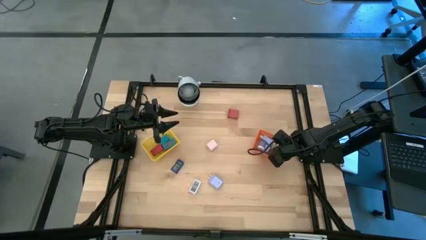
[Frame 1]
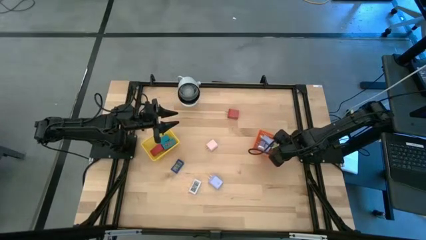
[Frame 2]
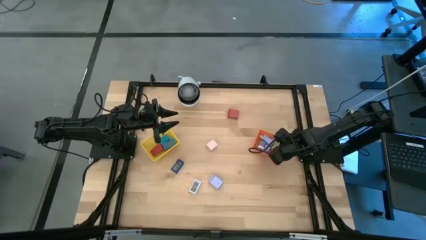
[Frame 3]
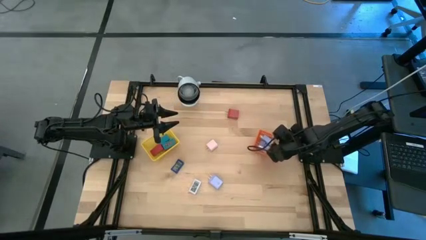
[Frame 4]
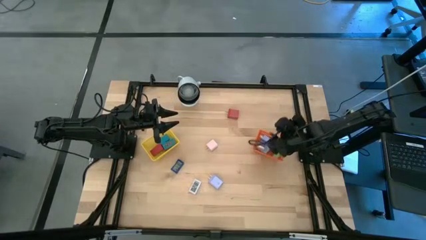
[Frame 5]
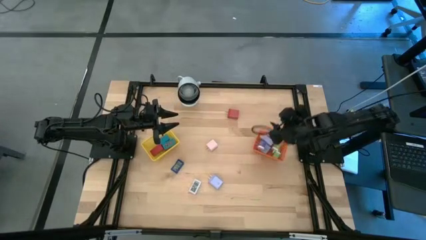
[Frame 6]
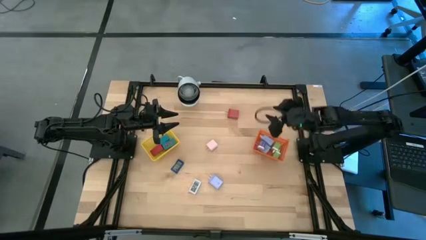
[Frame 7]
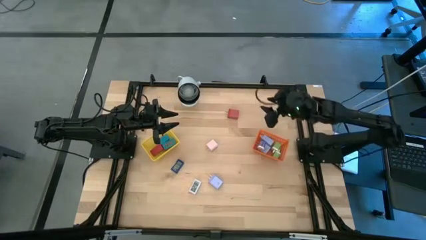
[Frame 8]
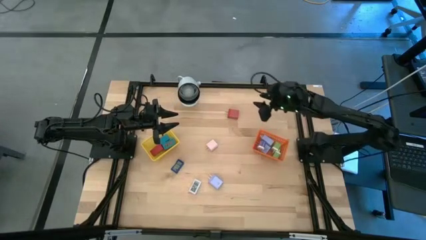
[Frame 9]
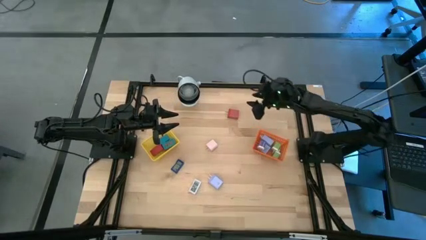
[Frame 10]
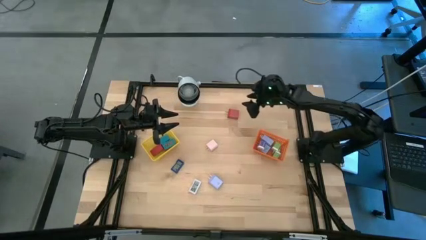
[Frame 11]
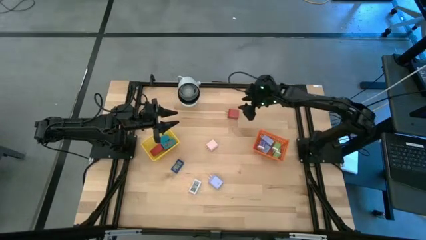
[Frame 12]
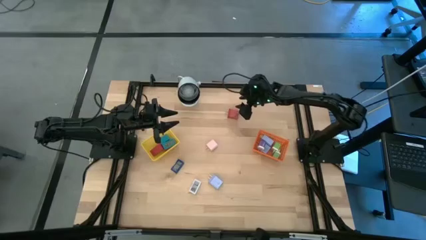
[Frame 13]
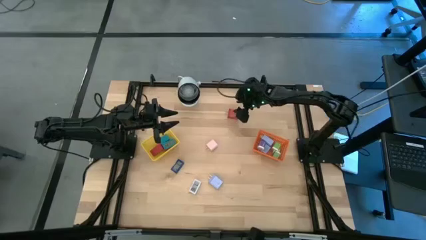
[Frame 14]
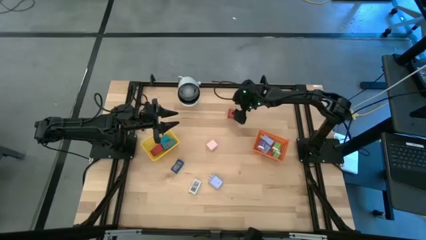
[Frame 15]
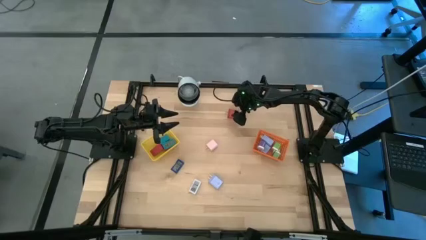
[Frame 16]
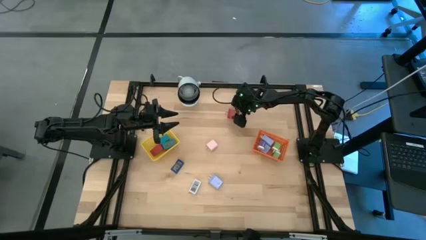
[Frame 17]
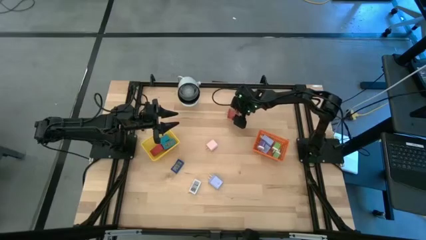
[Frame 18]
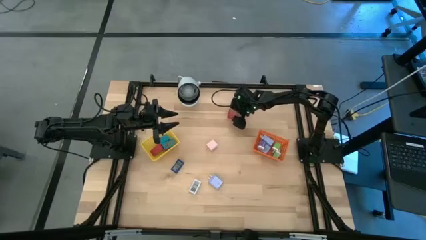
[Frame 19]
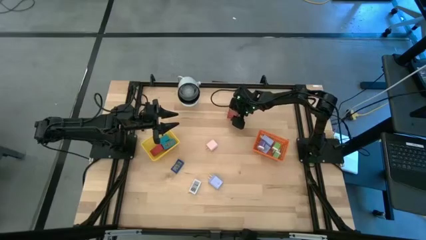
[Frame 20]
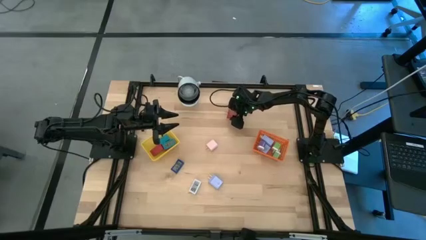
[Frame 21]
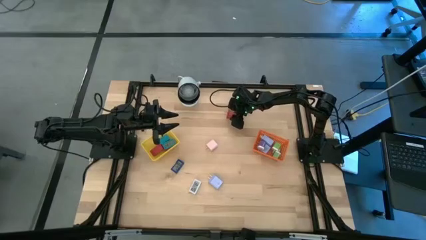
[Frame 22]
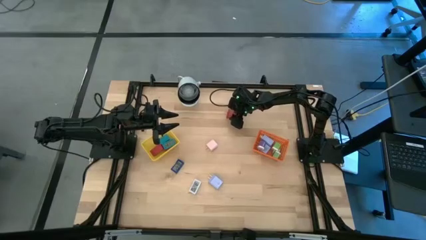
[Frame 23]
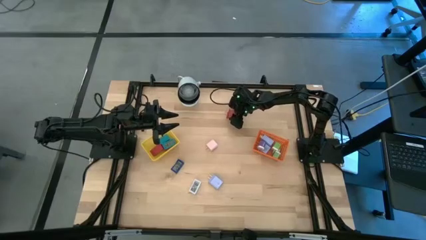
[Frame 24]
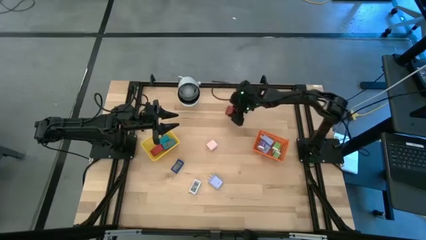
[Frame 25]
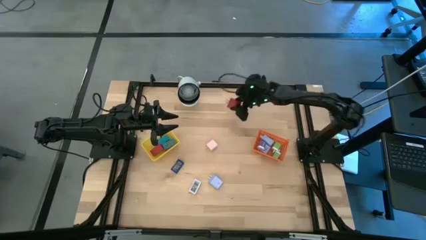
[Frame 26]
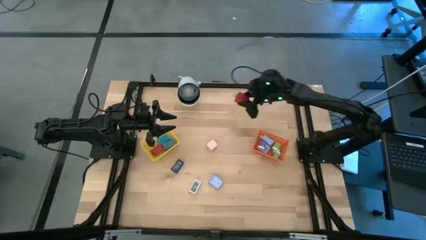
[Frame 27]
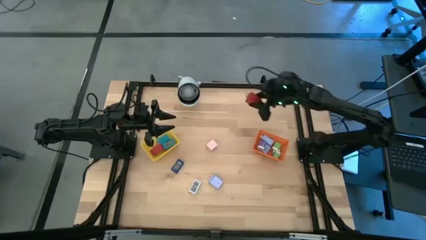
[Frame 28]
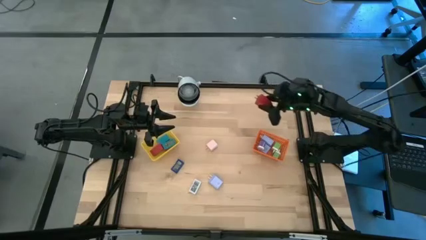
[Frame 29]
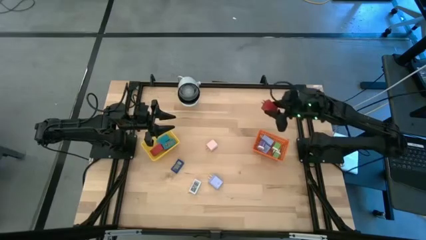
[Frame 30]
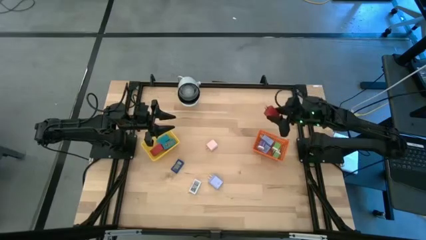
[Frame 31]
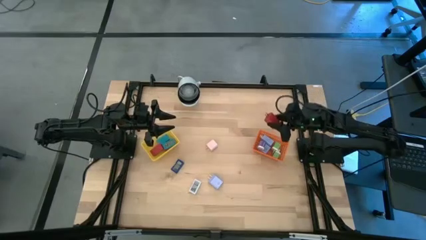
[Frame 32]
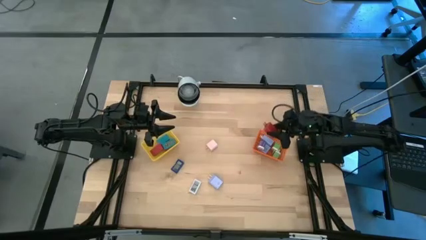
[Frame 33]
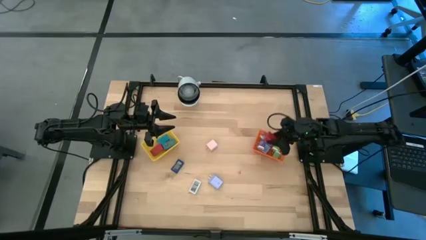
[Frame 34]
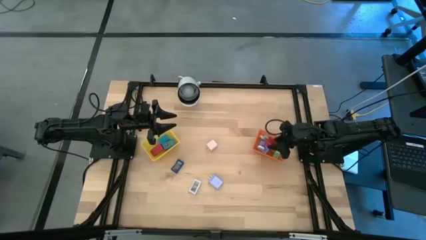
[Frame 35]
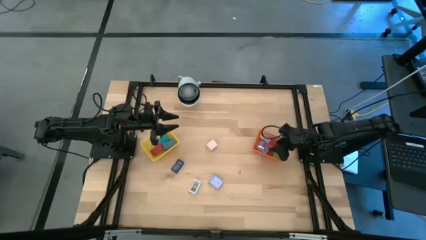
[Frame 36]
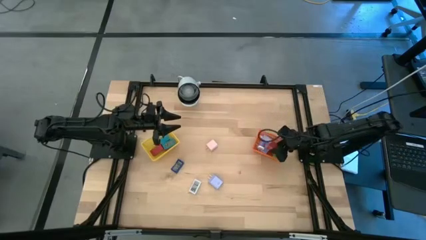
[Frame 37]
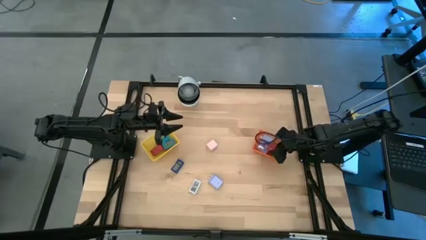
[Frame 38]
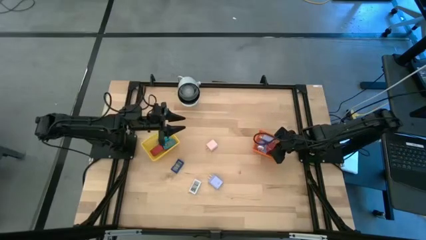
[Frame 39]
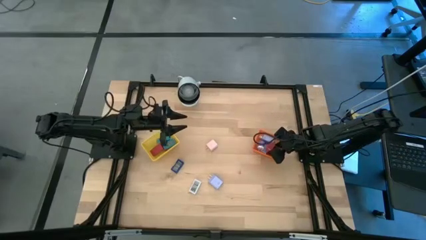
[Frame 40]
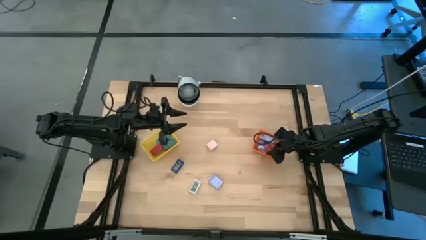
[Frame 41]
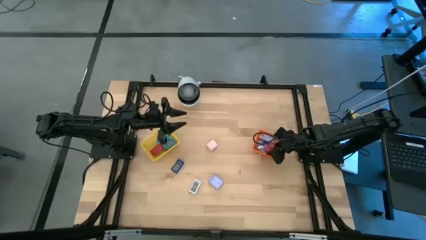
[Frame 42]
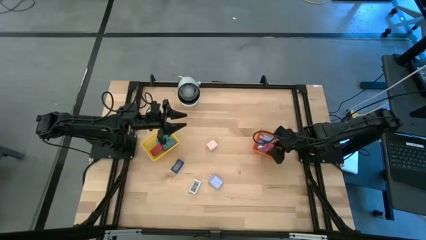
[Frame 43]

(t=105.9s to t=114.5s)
Task: Pick & Place Office items
Put the red charger adapter into the orange basket

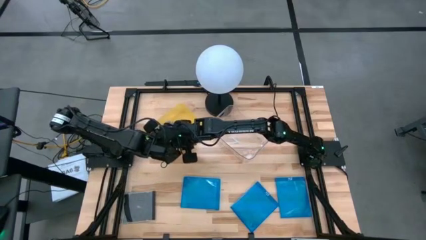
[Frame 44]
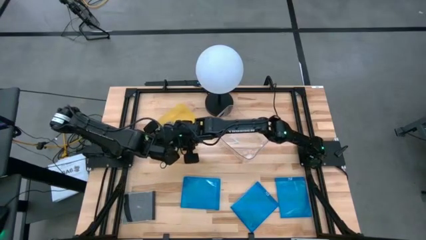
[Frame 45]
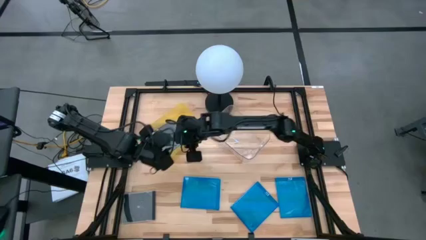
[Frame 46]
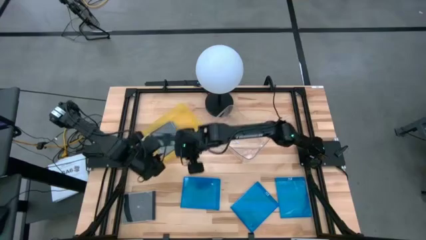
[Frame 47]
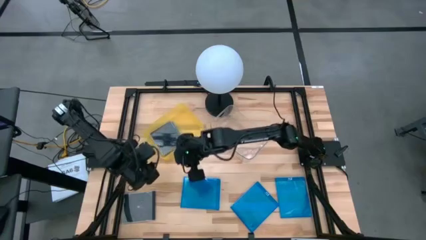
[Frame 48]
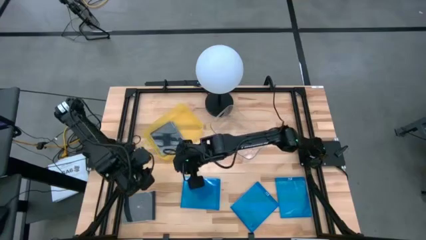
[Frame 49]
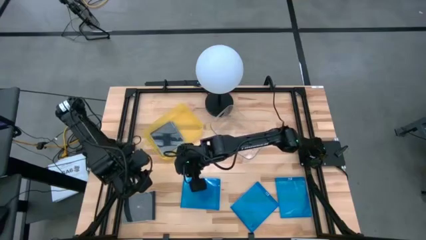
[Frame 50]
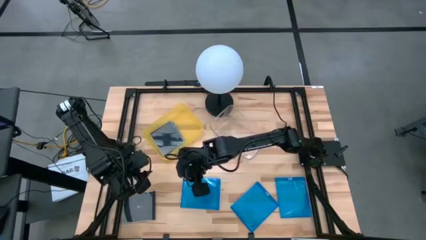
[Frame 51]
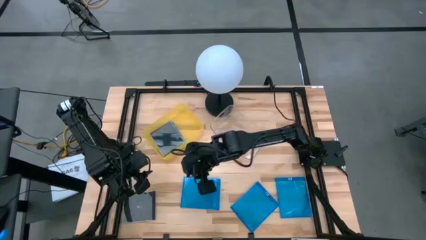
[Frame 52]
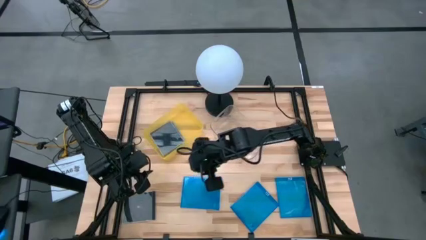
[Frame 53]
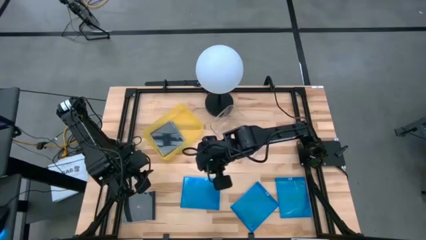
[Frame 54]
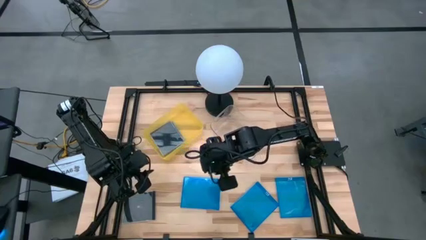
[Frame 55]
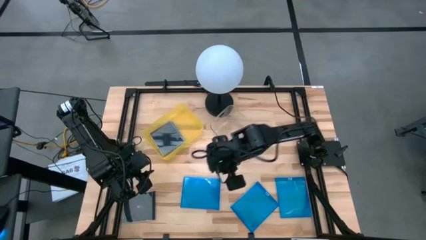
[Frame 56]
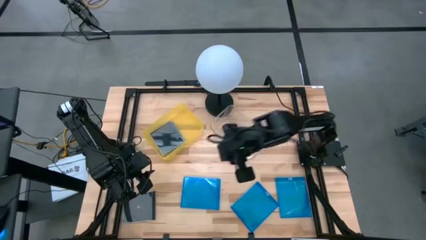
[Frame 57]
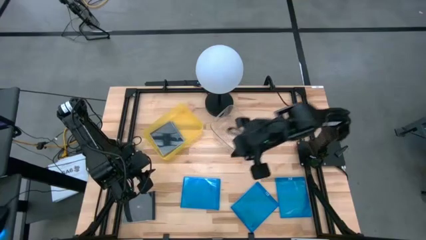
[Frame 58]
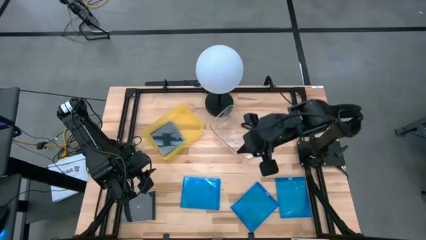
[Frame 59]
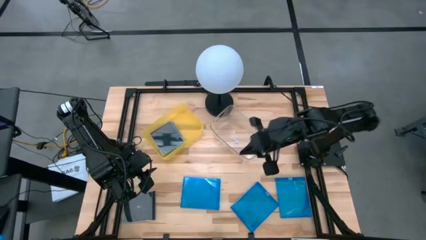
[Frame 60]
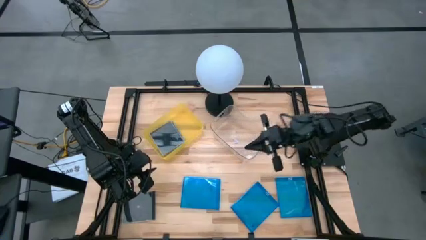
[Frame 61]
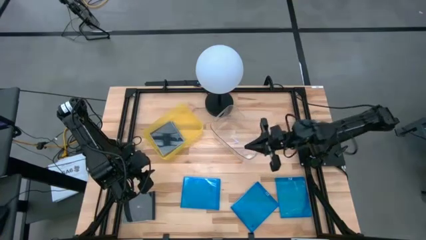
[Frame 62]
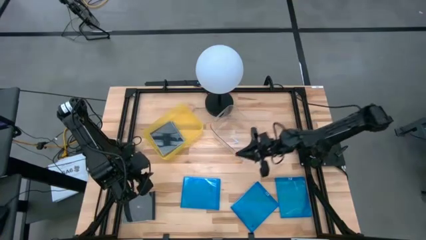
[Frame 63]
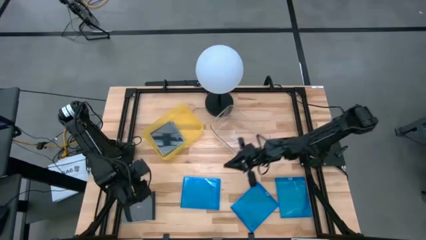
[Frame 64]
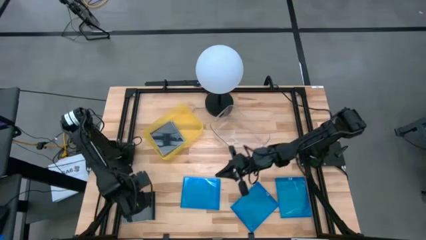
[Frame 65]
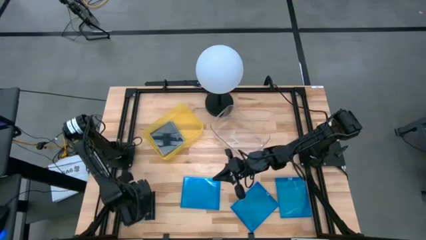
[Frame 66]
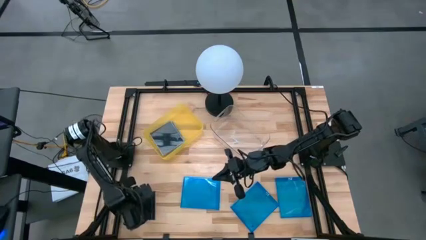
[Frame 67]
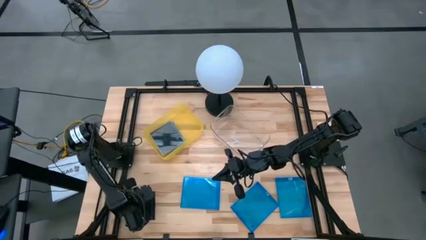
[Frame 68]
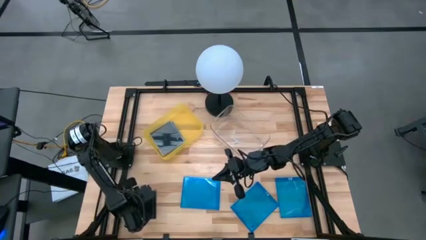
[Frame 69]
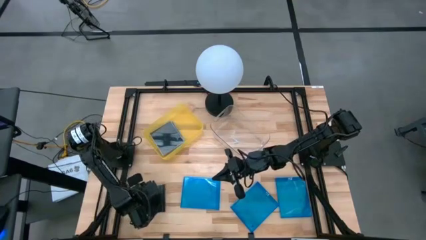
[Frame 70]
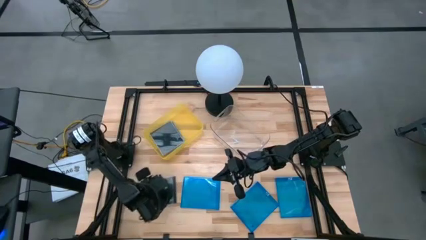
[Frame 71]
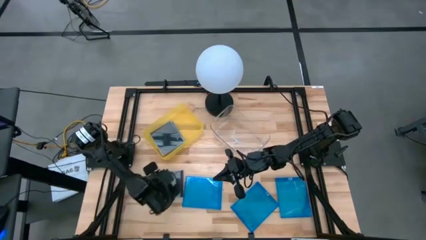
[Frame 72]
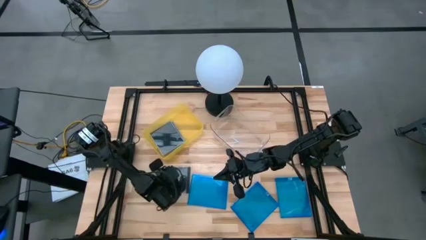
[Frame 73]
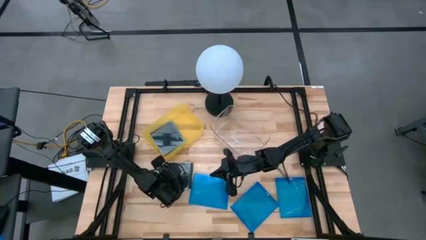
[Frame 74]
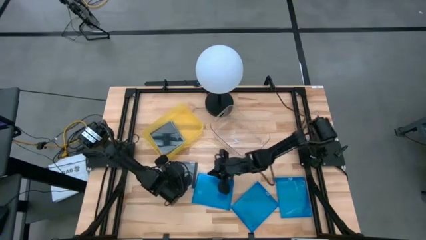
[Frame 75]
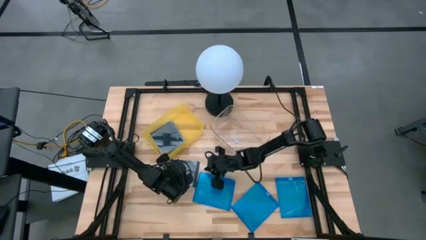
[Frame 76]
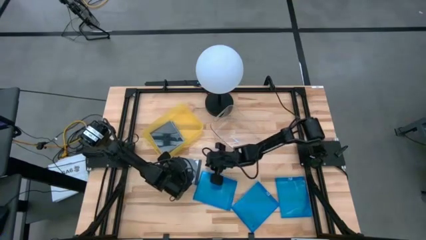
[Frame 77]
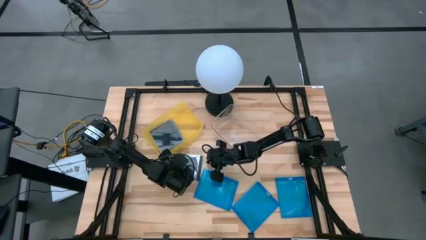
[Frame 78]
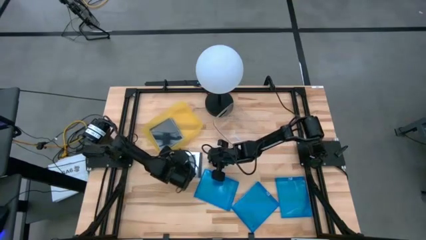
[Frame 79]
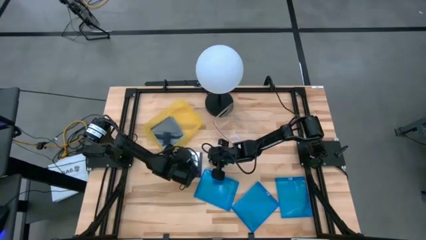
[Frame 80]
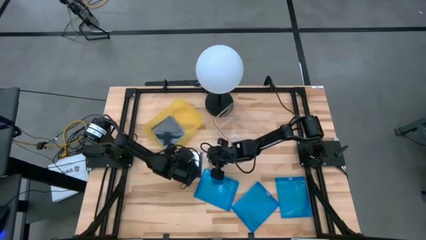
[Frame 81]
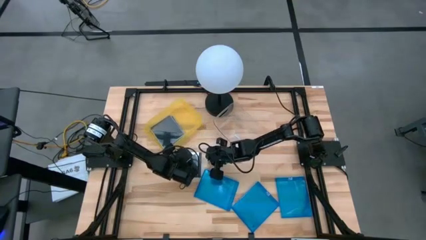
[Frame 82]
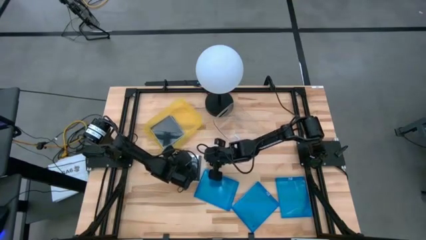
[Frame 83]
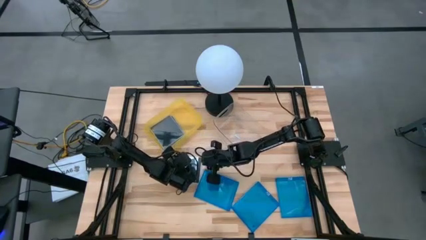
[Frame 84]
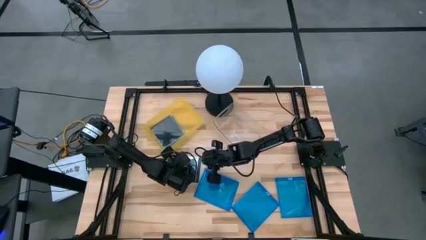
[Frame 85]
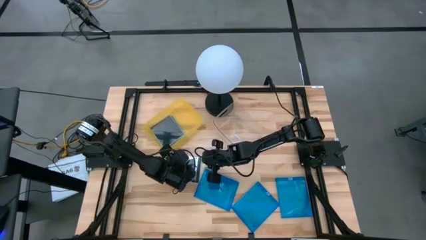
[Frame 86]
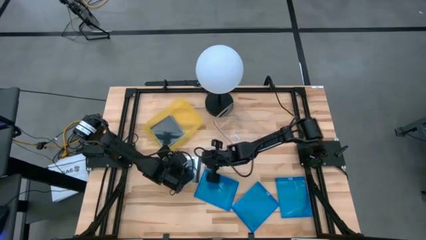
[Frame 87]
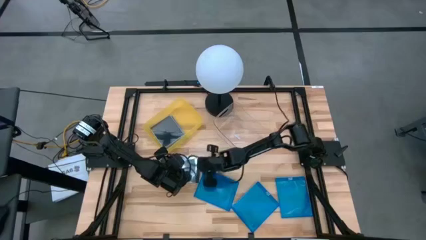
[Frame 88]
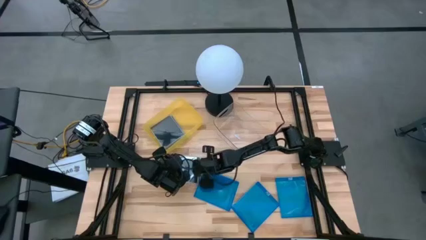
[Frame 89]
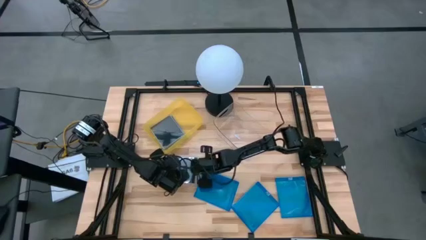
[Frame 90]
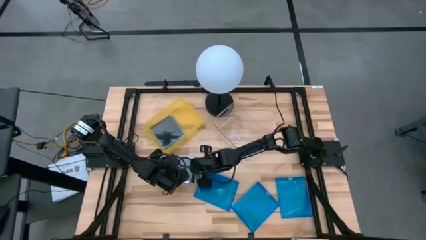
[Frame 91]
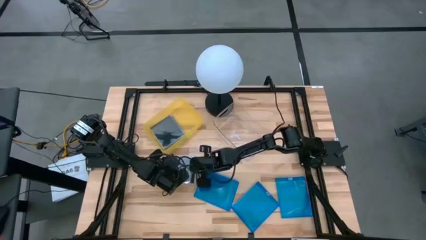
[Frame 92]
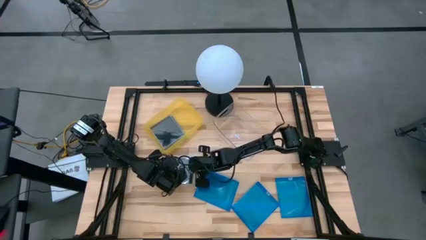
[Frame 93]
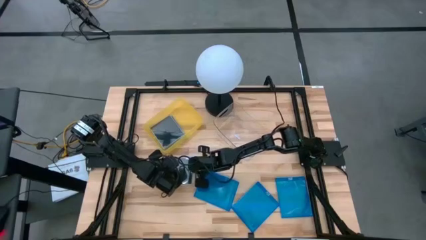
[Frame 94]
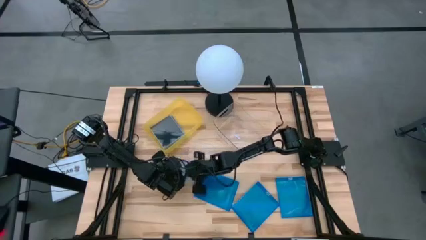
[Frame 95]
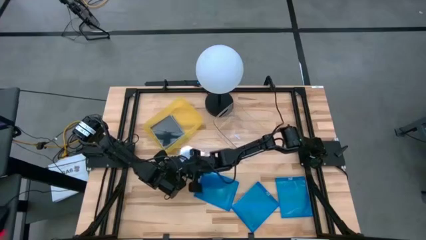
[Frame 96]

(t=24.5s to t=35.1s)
Task: Pick & place jewel cases by type
Put the black CD case into the yellow bin
